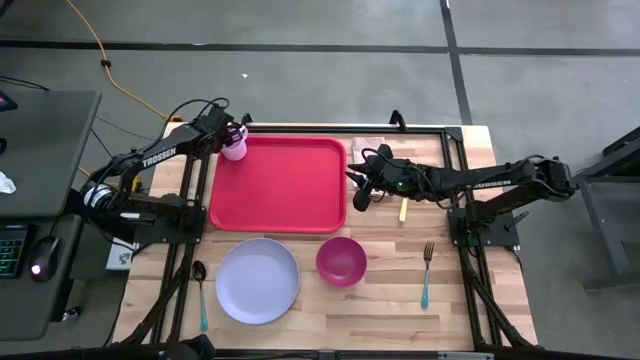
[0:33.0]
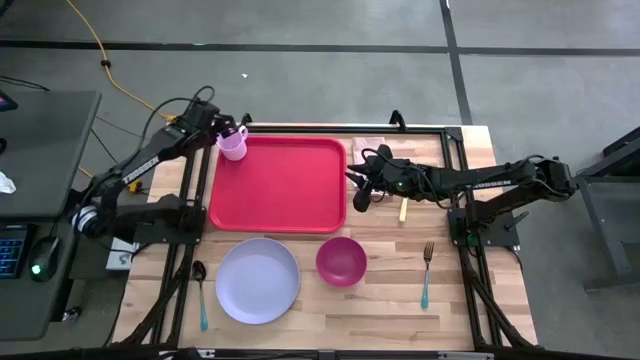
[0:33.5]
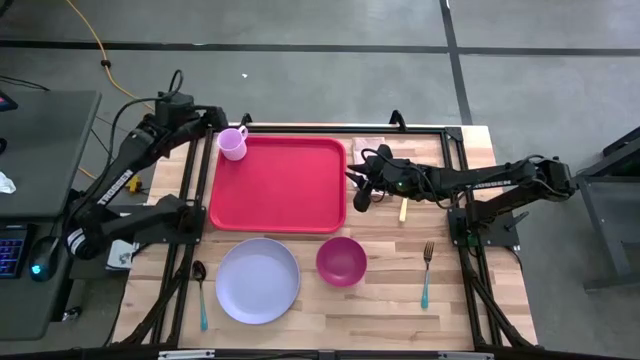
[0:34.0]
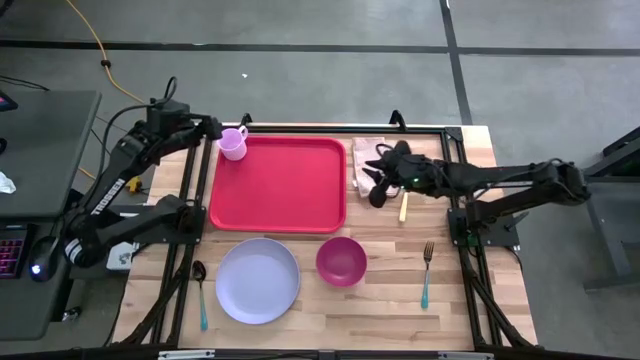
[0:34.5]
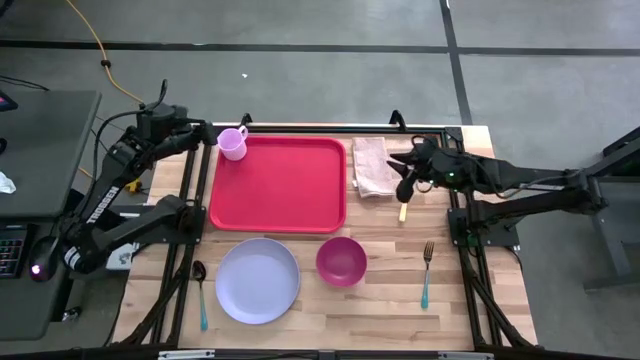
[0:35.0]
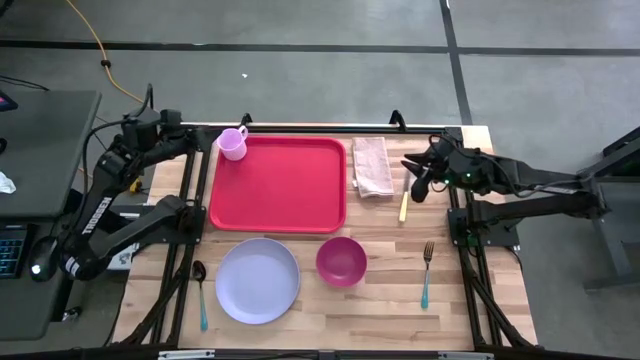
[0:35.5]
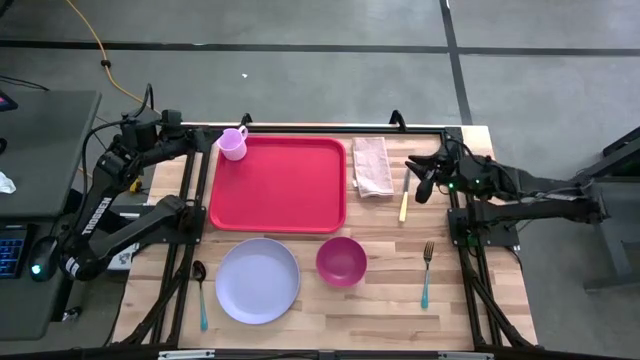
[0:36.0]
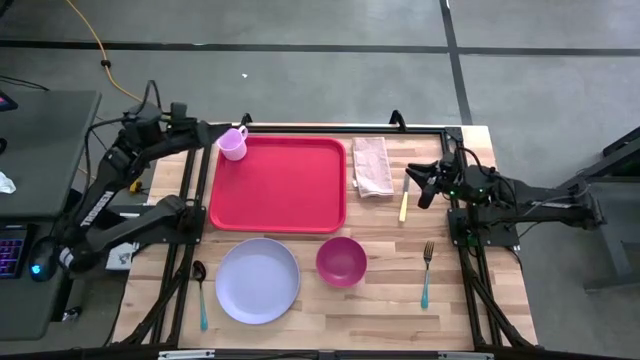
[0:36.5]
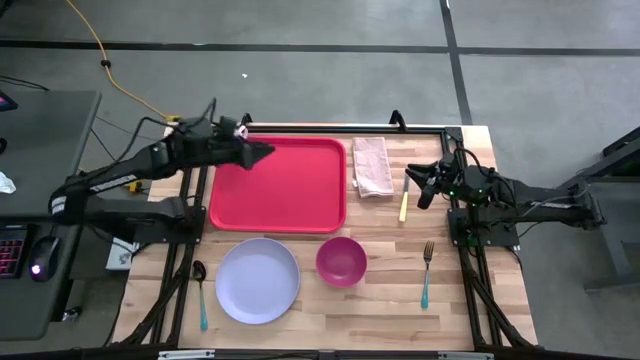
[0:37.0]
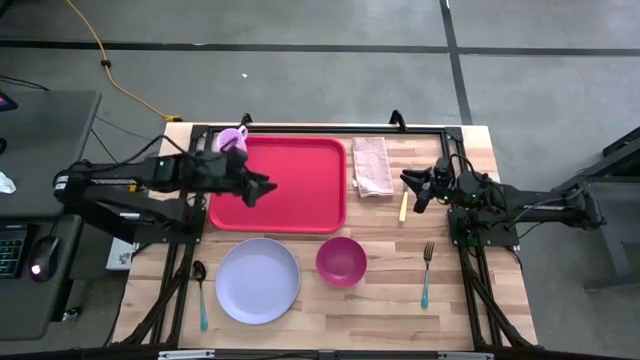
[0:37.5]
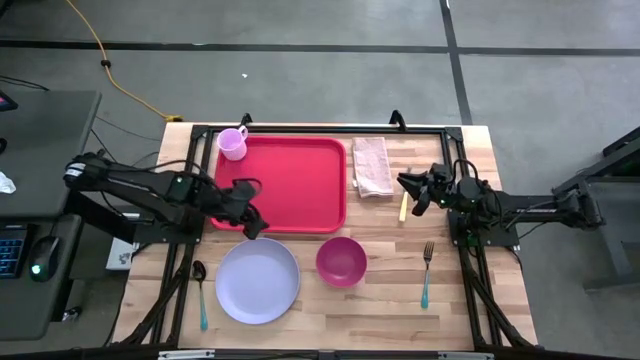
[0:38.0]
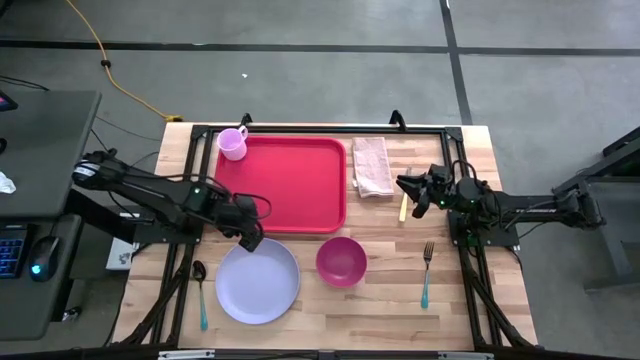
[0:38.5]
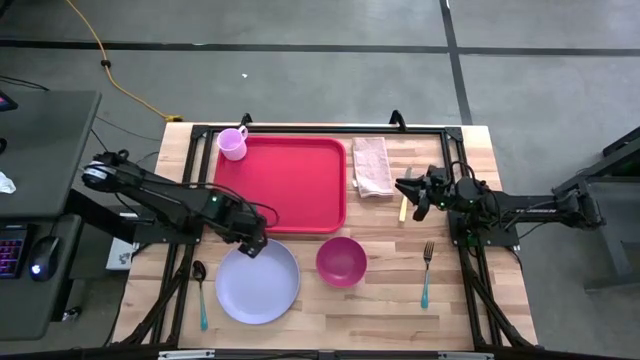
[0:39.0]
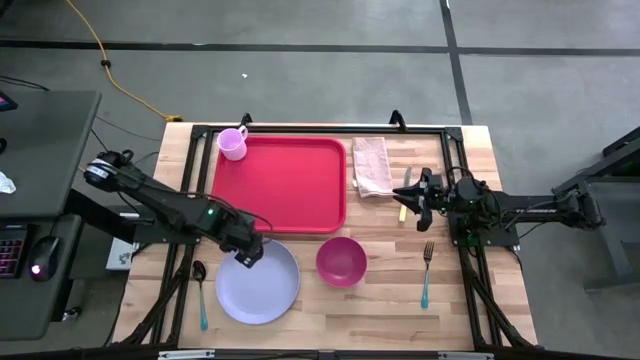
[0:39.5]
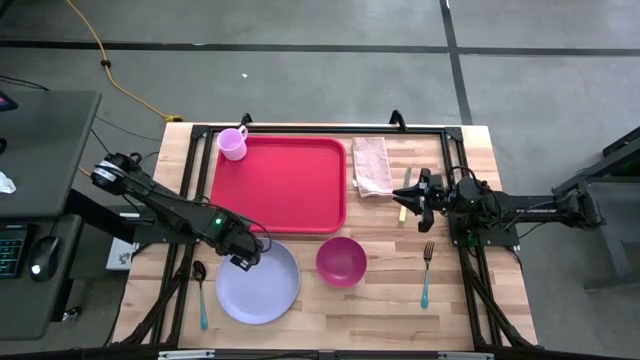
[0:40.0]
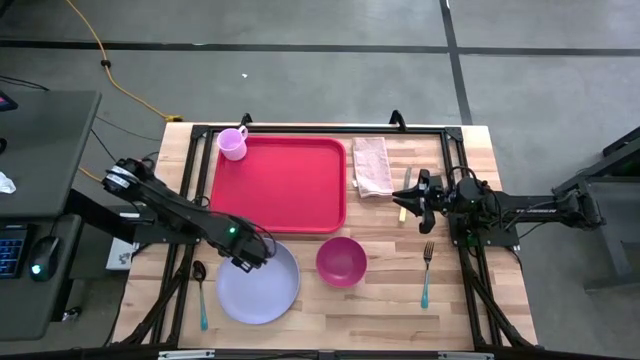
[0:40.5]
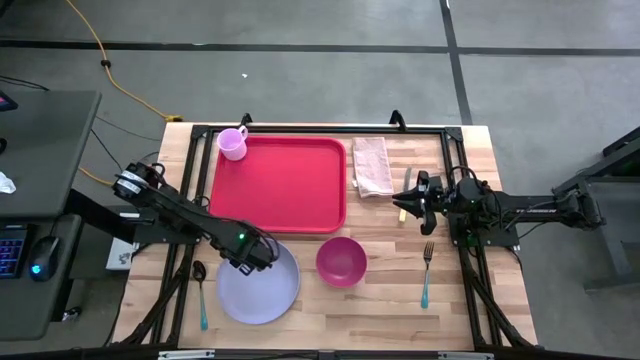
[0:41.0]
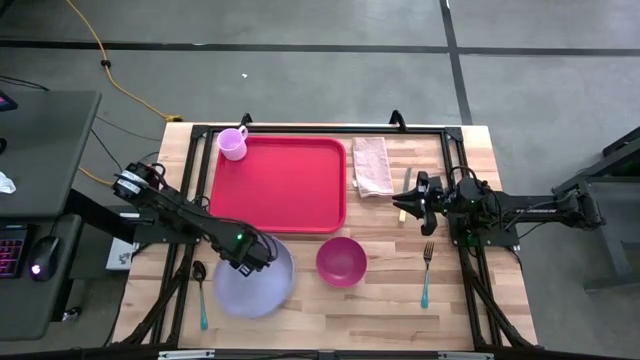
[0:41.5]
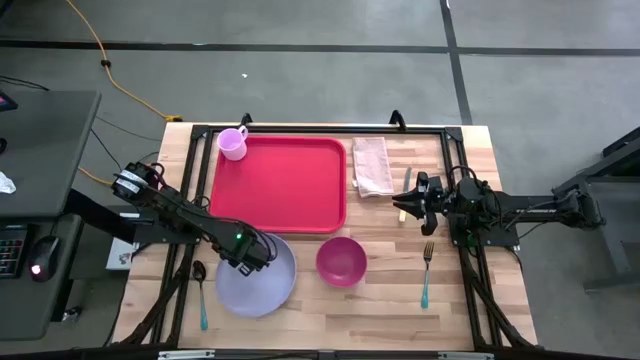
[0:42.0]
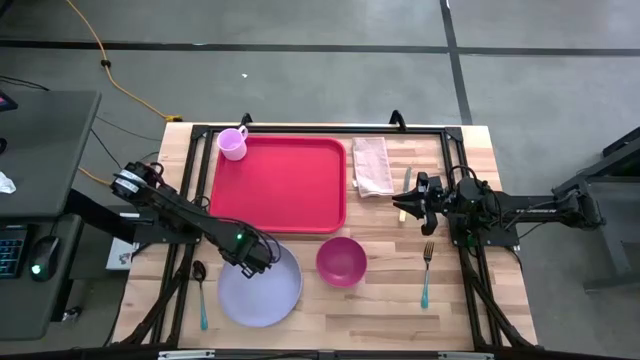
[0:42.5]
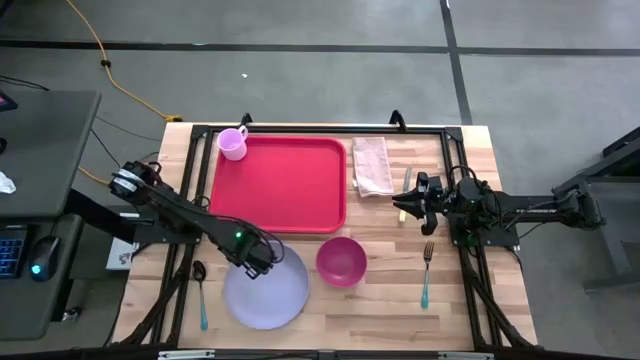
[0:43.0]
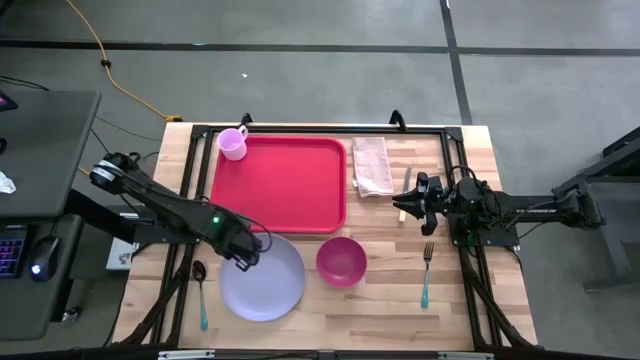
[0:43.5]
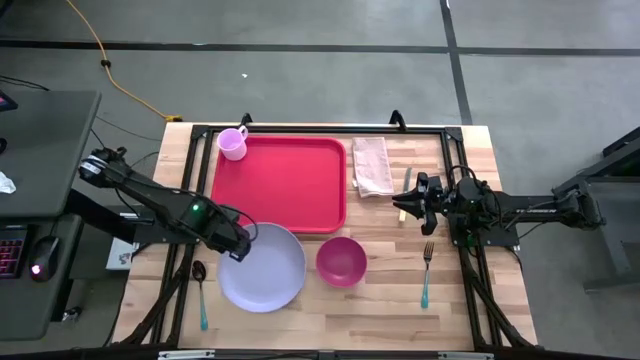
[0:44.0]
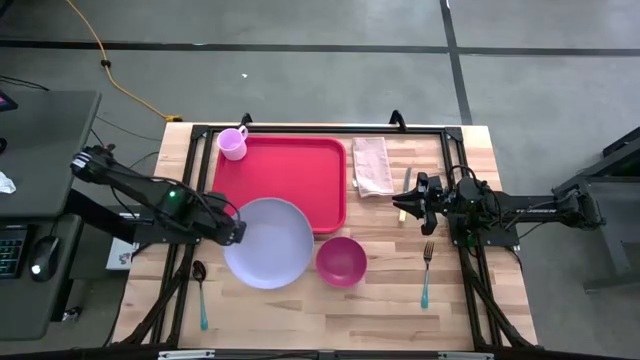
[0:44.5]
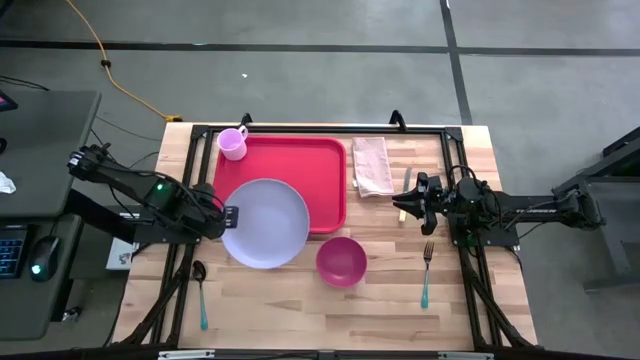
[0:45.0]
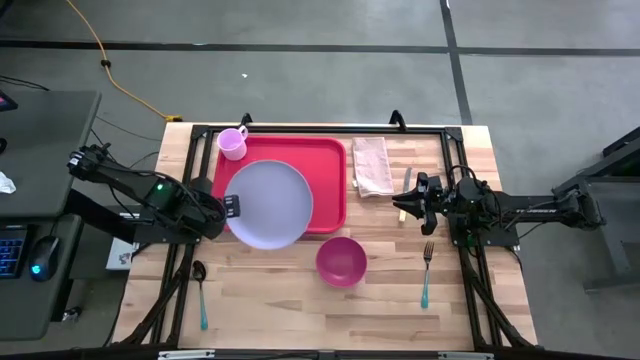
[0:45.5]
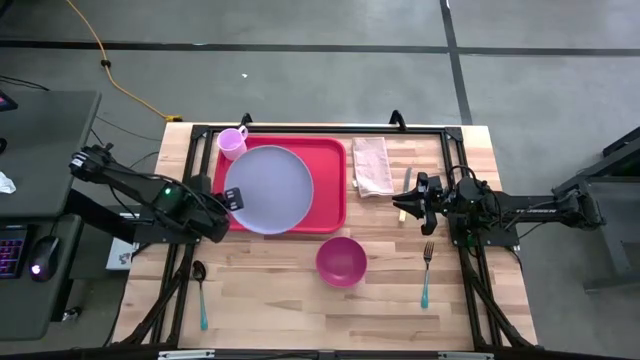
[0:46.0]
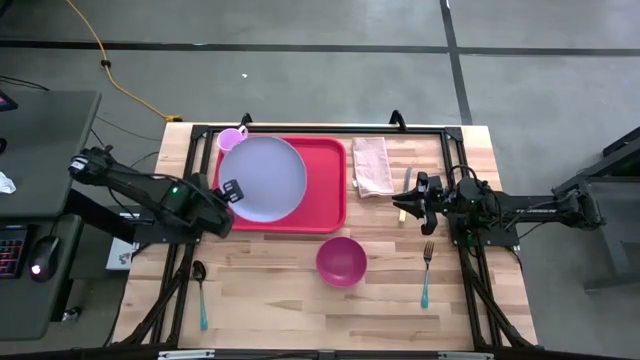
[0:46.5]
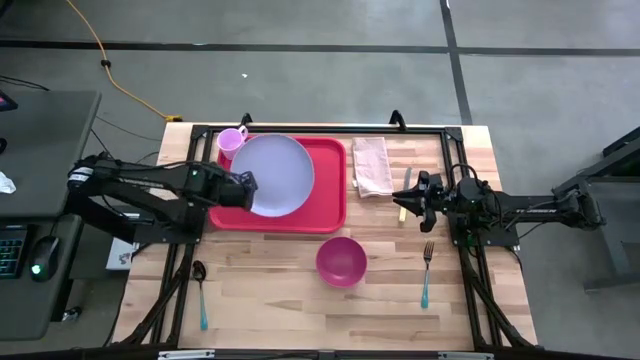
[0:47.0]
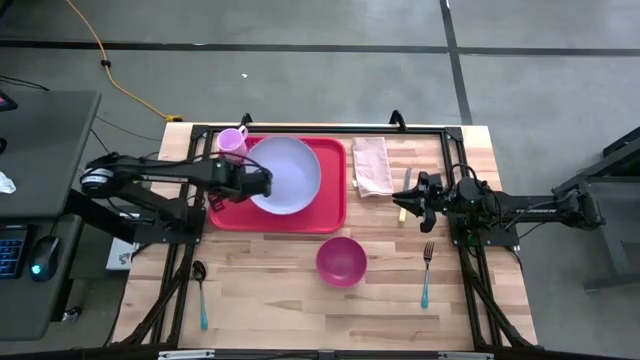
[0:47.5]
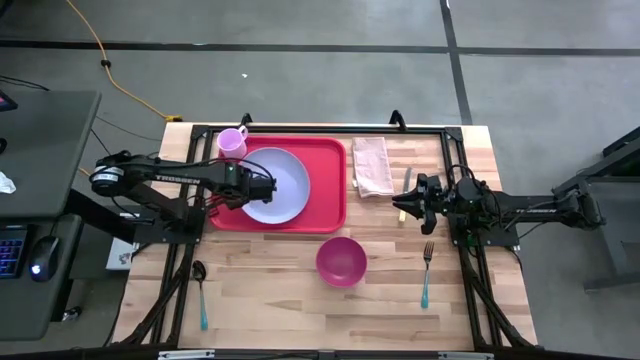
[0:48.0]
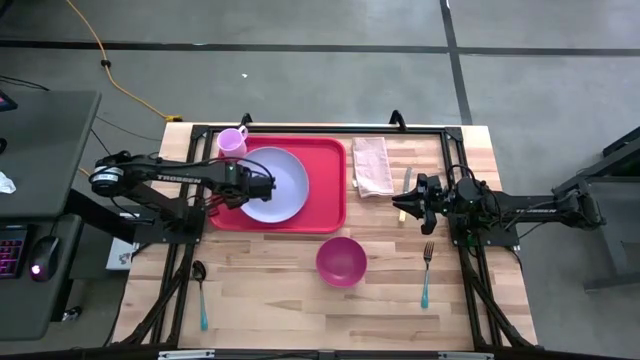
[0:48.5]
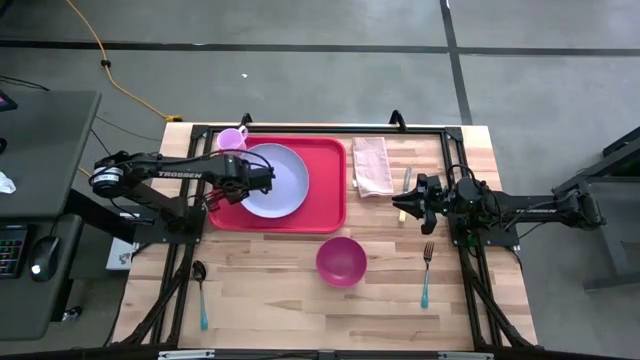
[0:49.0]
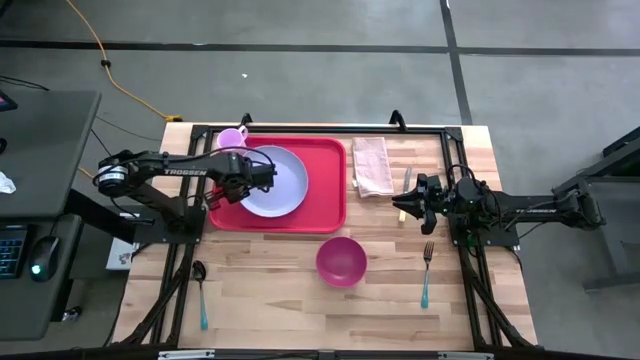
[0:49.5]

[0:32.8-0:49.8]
Task: Set up tray
Put the purple plate on the red serving tray to the bottom right of the pink mug

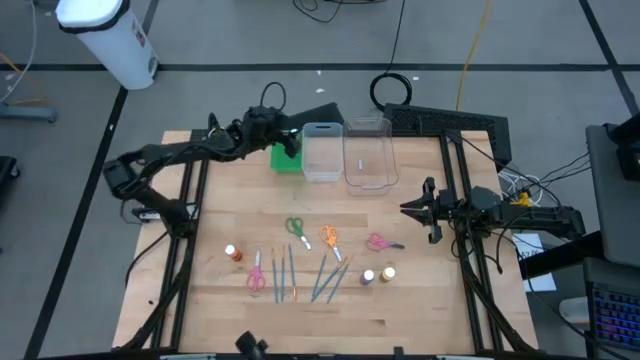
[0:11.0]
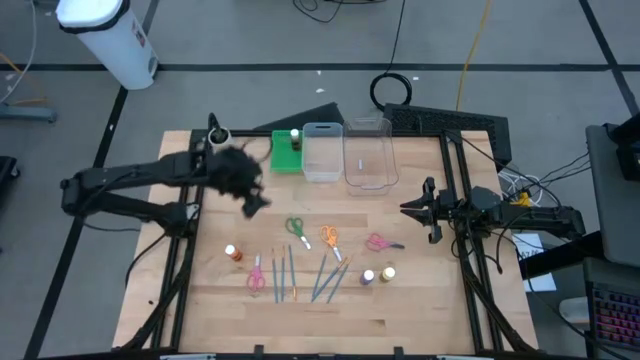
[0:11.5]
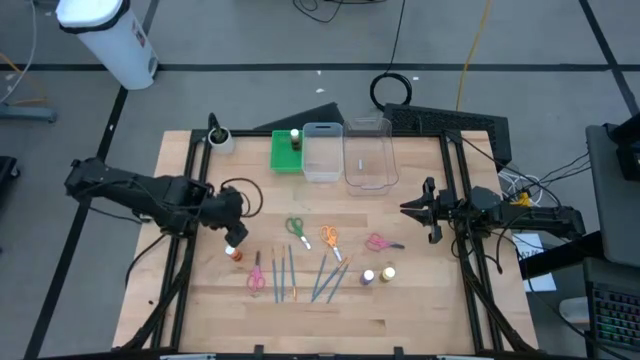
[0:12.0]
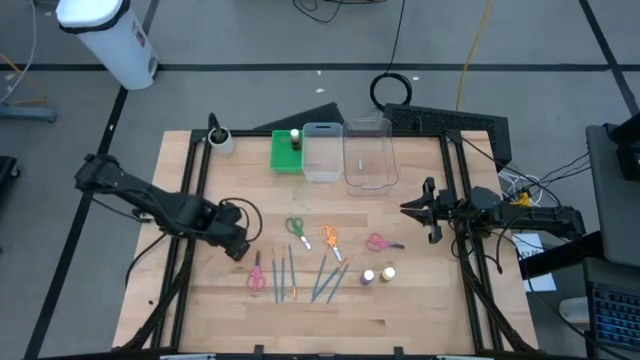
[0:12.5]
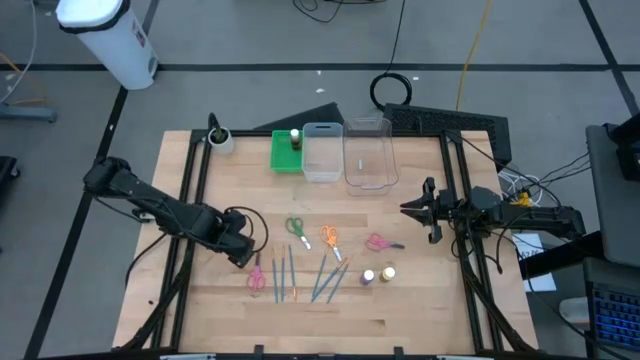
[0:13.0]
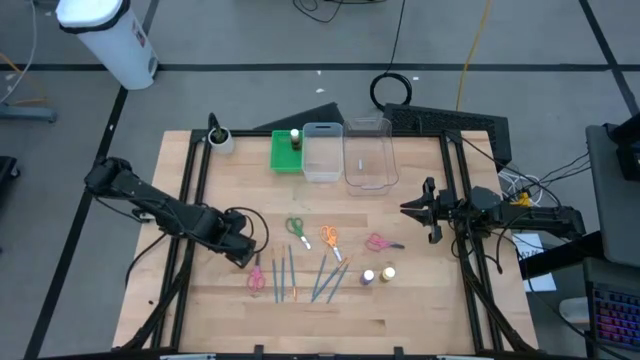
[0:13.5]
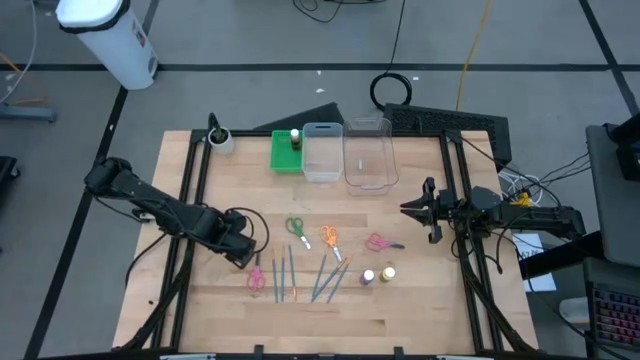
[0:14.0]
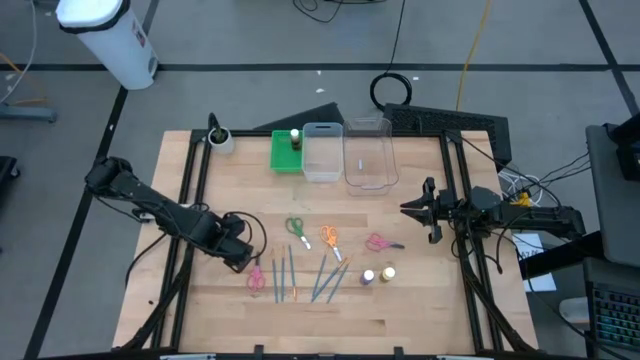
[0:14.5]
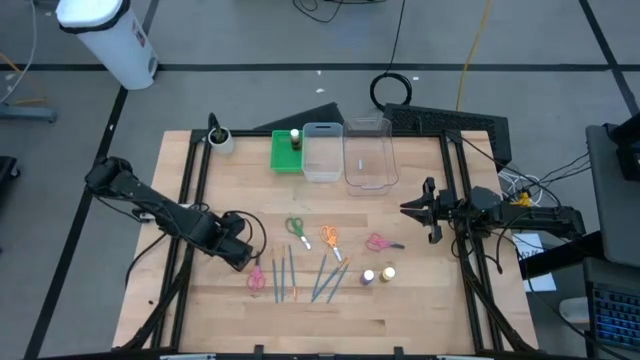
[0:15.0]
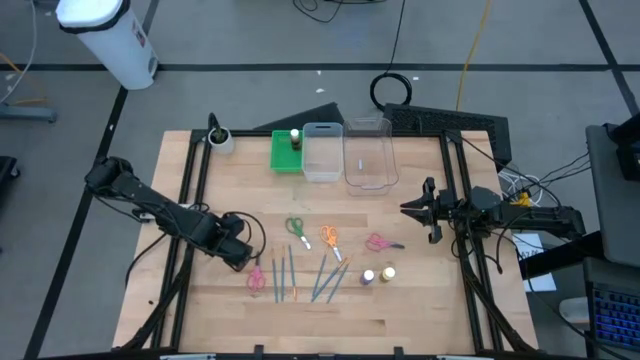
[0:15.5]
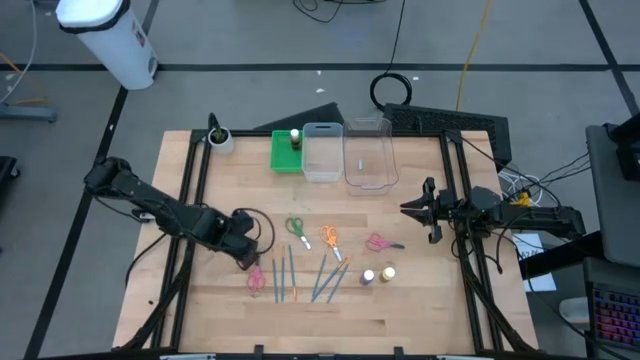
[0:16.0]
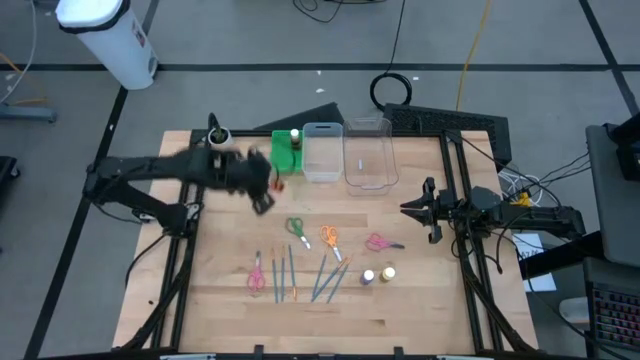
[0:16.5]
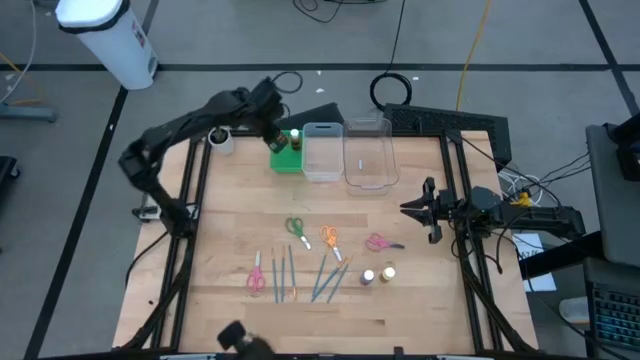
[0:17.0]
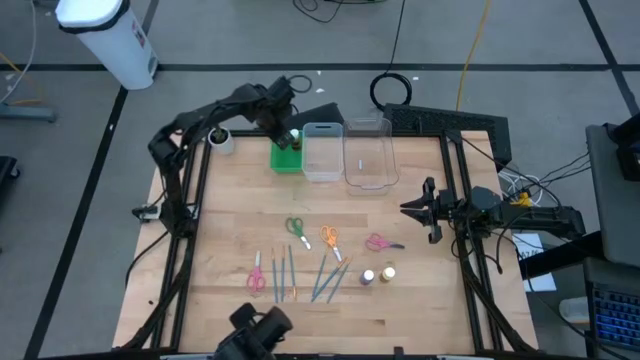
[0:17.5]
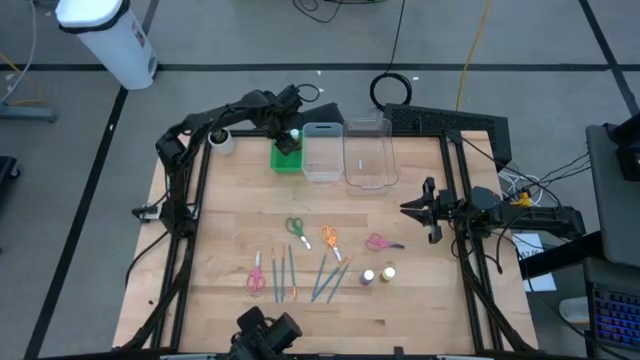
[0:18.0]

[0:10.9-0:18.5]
Task: Pick & Place Paint Supplies
Put the orange paint bottle into the green bin
